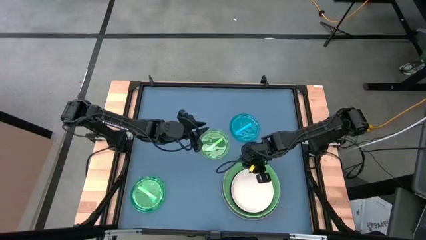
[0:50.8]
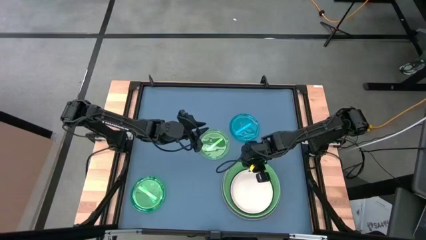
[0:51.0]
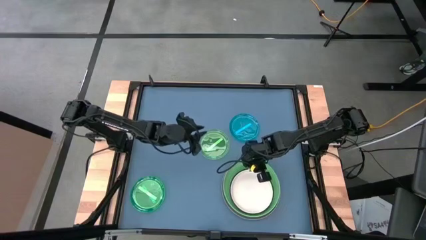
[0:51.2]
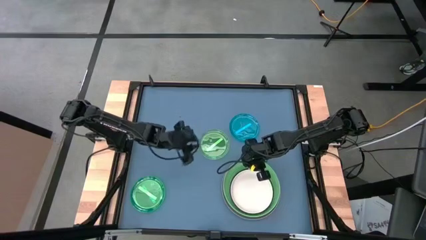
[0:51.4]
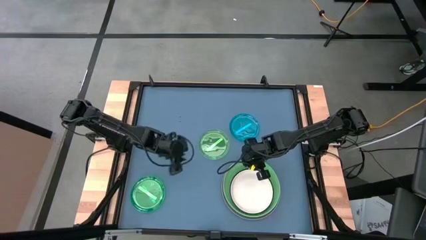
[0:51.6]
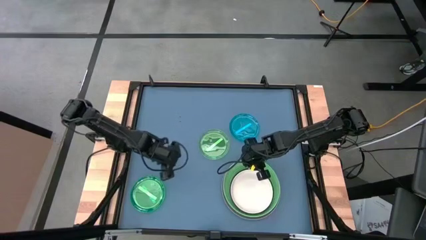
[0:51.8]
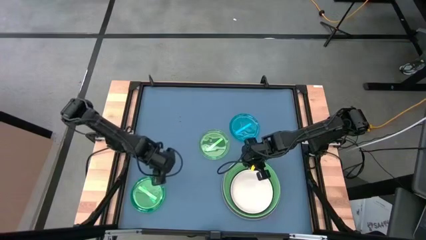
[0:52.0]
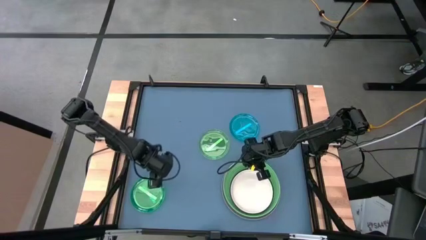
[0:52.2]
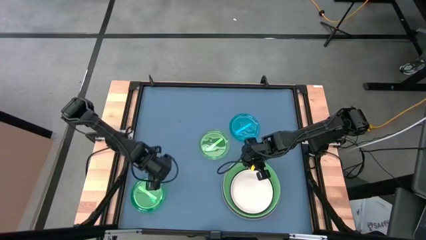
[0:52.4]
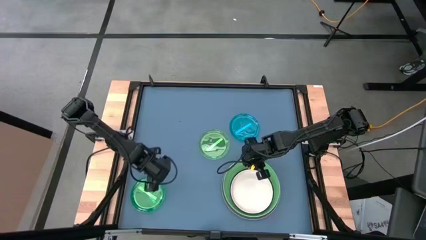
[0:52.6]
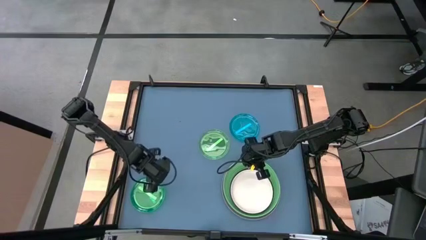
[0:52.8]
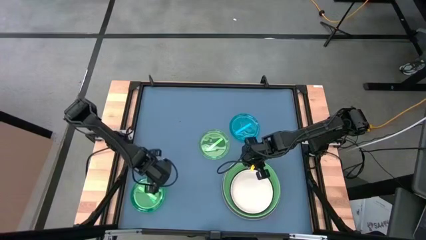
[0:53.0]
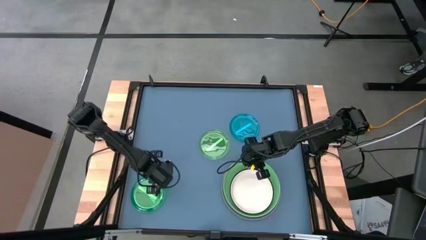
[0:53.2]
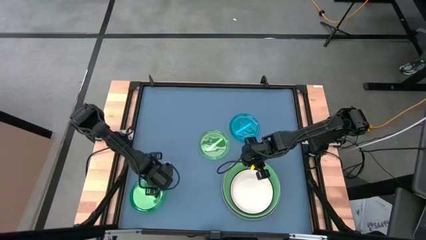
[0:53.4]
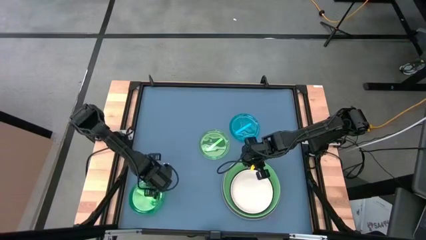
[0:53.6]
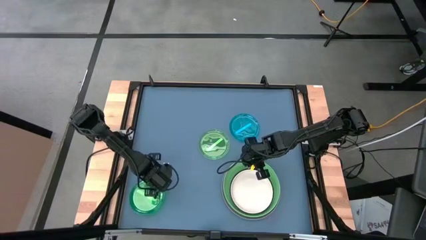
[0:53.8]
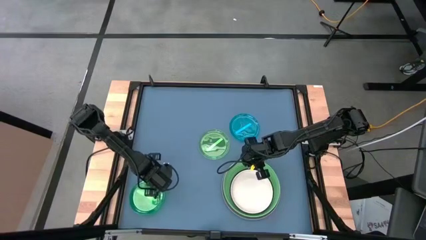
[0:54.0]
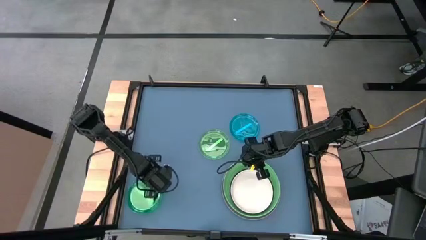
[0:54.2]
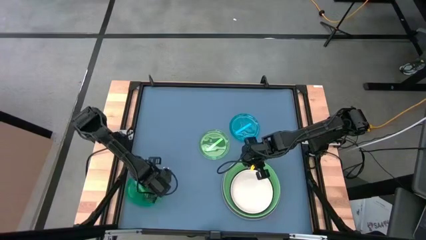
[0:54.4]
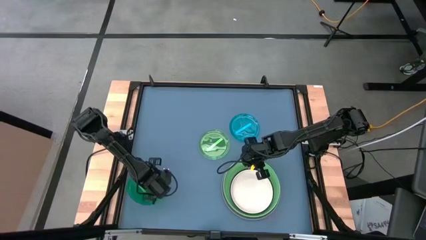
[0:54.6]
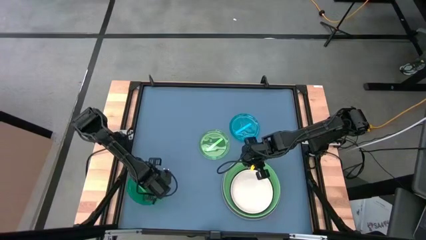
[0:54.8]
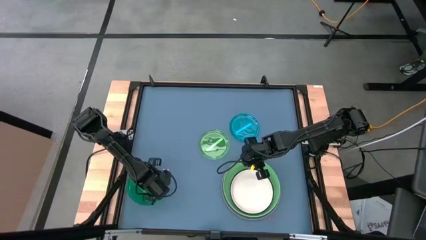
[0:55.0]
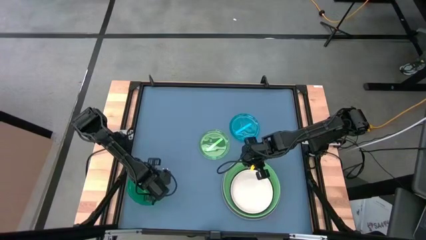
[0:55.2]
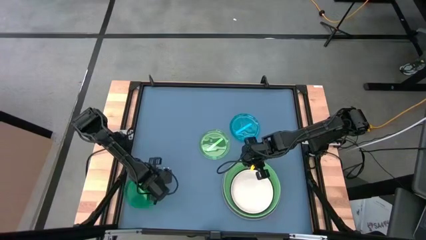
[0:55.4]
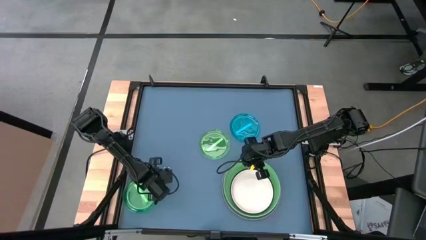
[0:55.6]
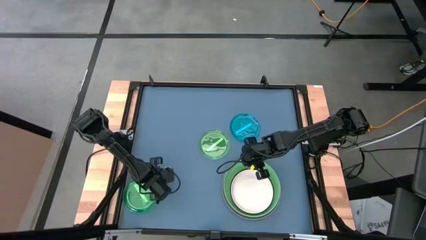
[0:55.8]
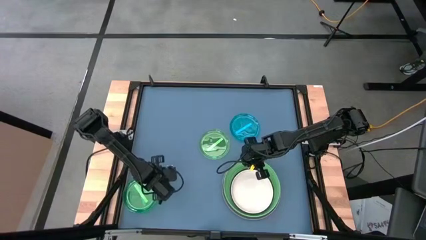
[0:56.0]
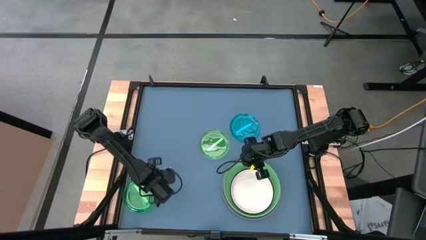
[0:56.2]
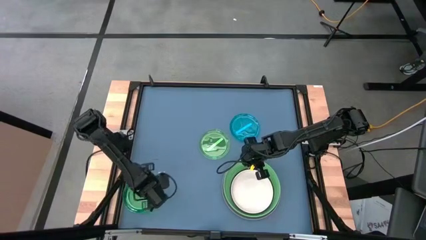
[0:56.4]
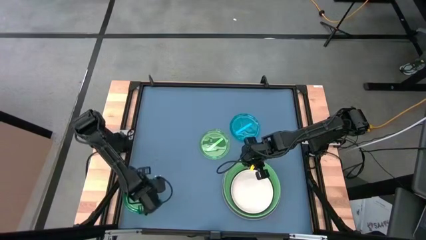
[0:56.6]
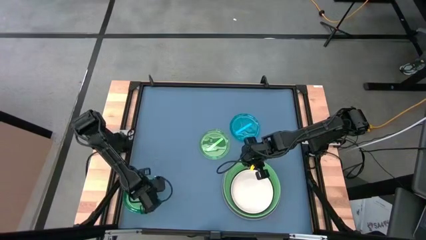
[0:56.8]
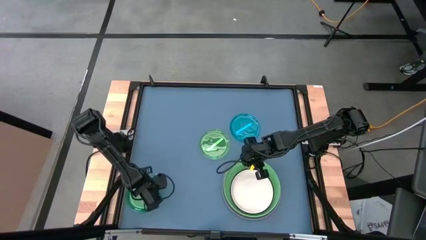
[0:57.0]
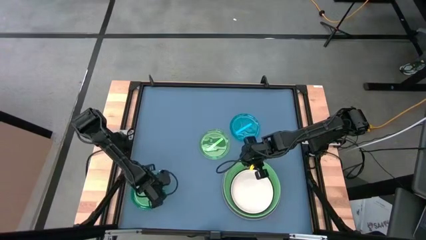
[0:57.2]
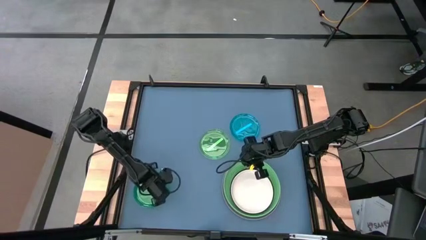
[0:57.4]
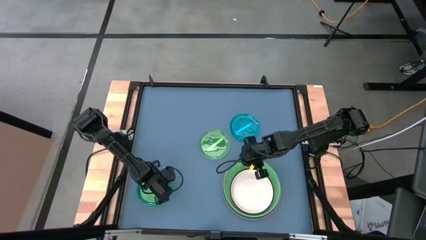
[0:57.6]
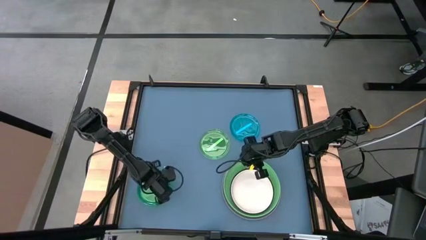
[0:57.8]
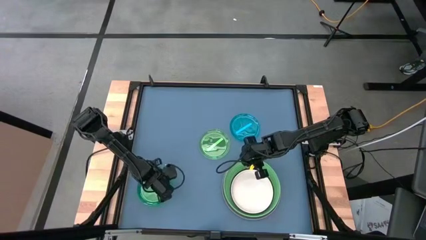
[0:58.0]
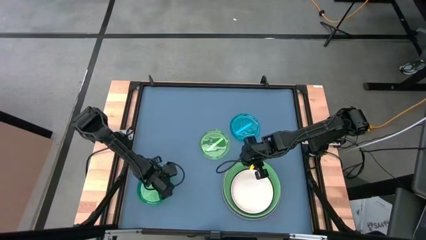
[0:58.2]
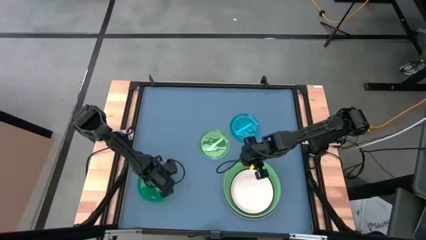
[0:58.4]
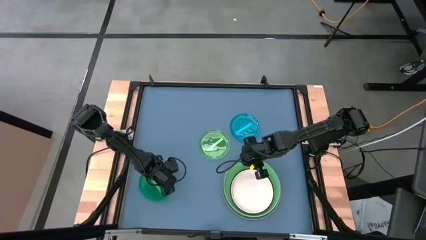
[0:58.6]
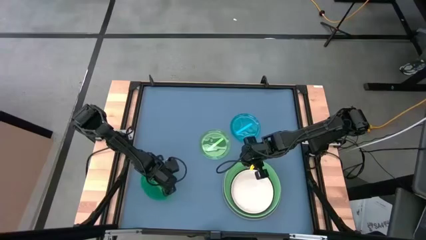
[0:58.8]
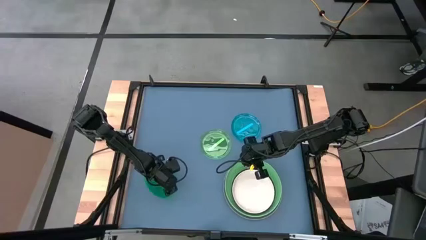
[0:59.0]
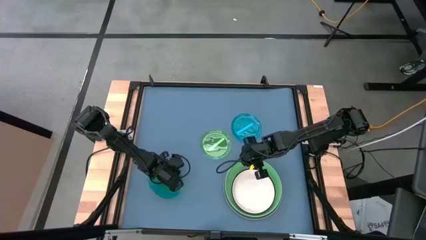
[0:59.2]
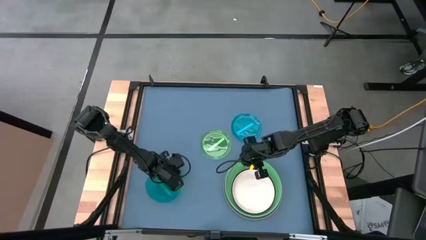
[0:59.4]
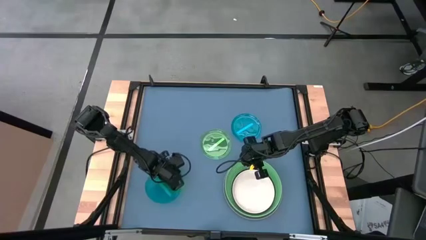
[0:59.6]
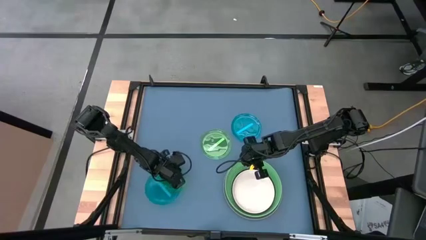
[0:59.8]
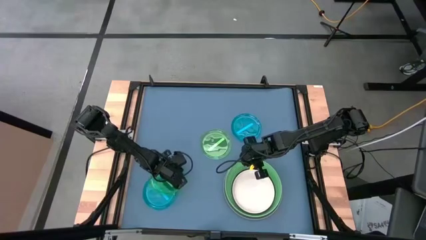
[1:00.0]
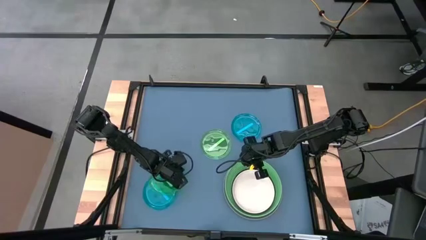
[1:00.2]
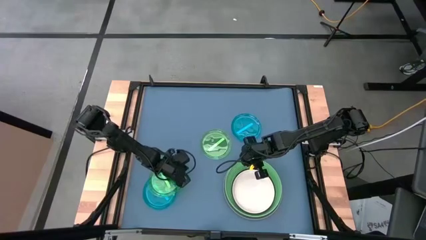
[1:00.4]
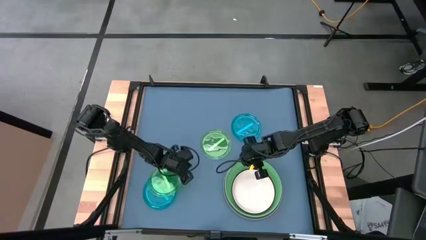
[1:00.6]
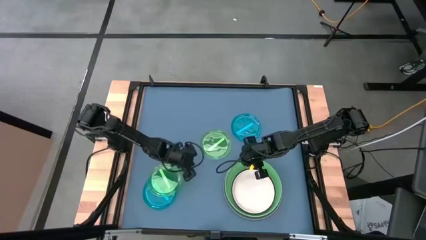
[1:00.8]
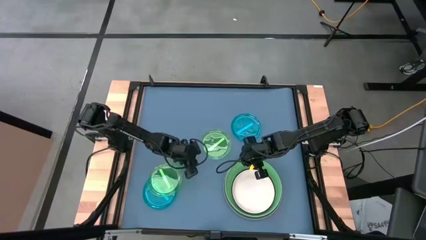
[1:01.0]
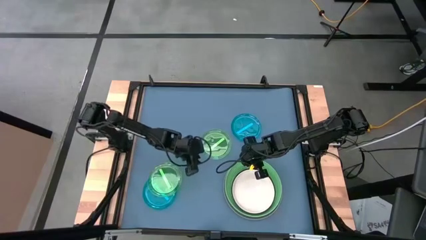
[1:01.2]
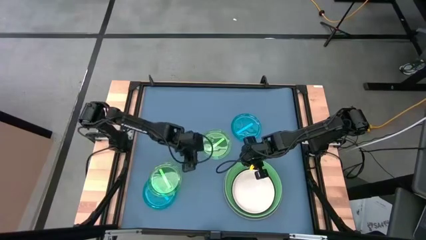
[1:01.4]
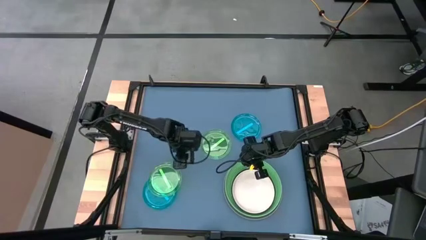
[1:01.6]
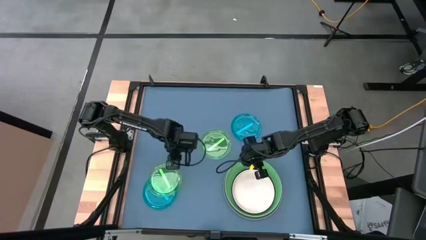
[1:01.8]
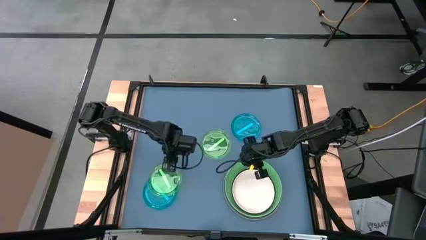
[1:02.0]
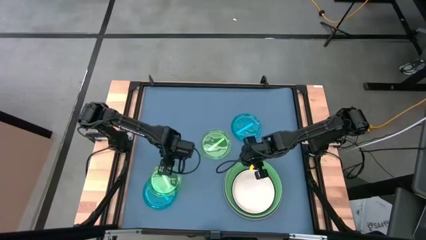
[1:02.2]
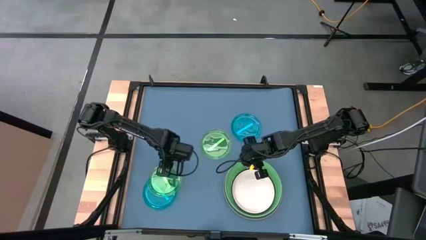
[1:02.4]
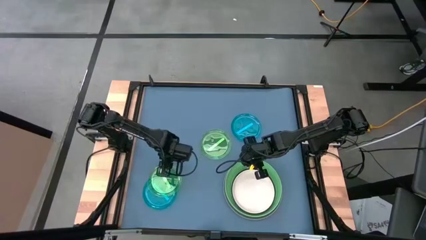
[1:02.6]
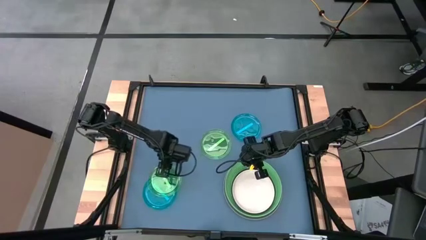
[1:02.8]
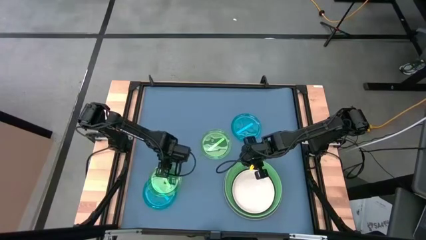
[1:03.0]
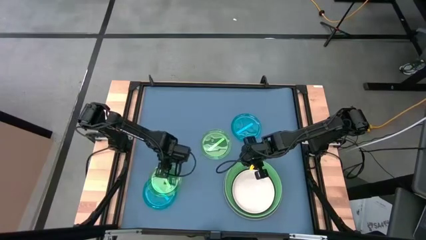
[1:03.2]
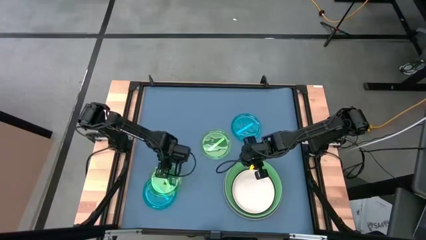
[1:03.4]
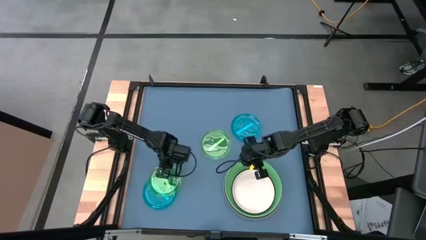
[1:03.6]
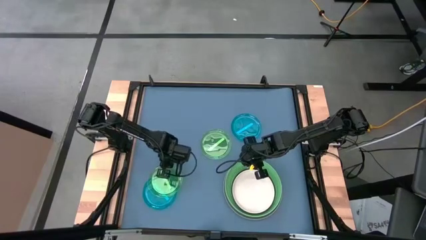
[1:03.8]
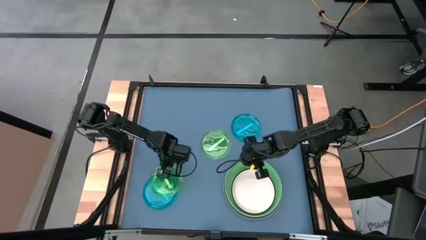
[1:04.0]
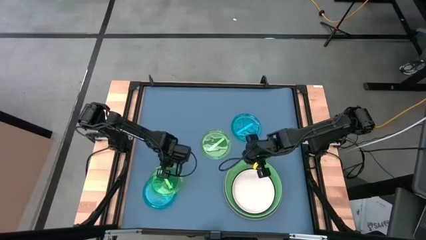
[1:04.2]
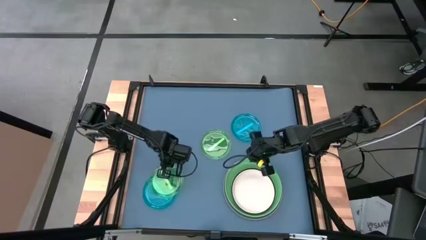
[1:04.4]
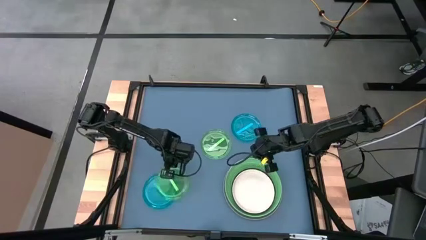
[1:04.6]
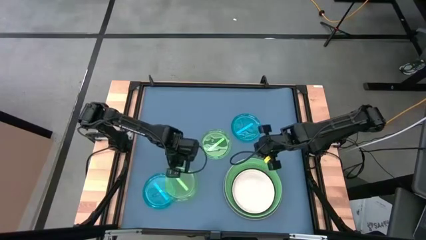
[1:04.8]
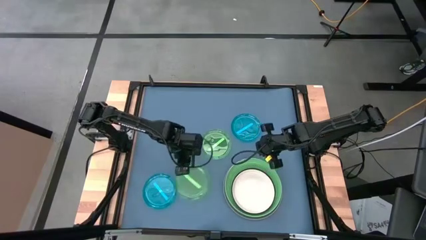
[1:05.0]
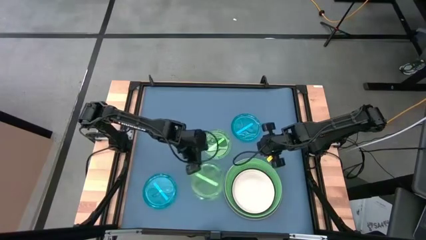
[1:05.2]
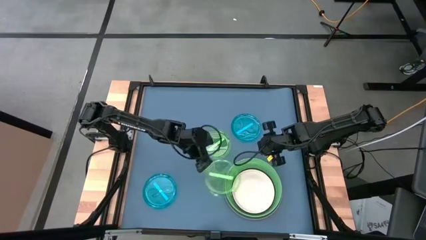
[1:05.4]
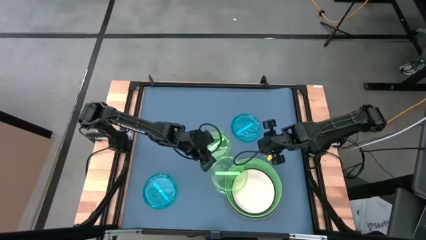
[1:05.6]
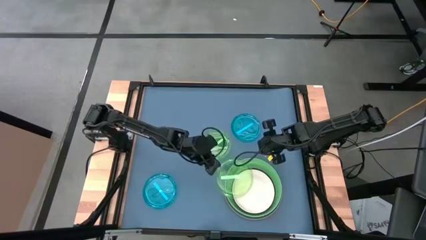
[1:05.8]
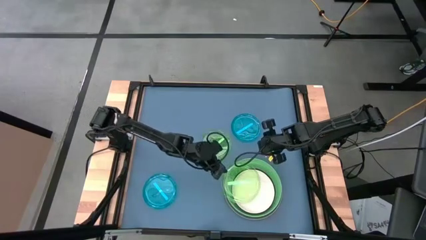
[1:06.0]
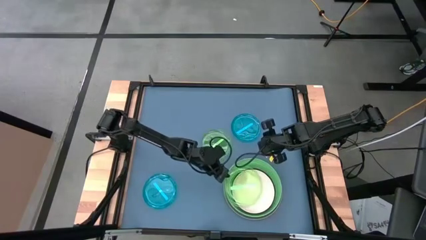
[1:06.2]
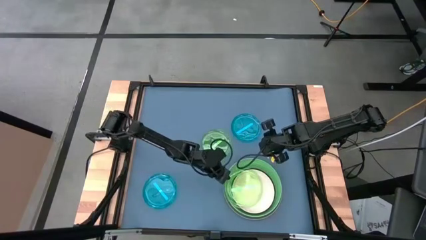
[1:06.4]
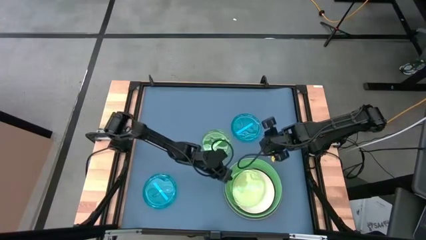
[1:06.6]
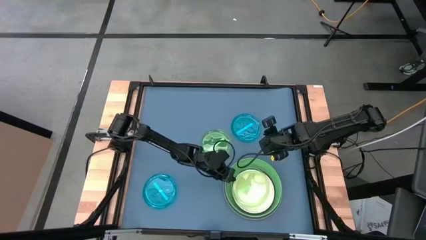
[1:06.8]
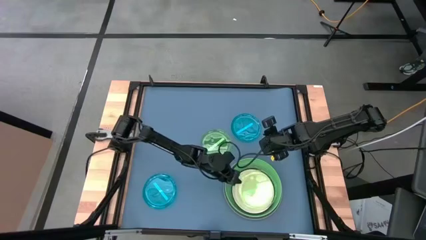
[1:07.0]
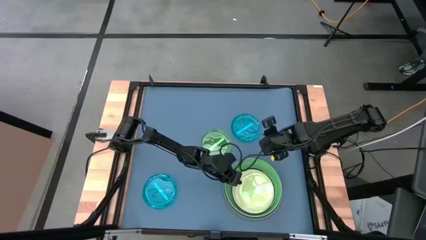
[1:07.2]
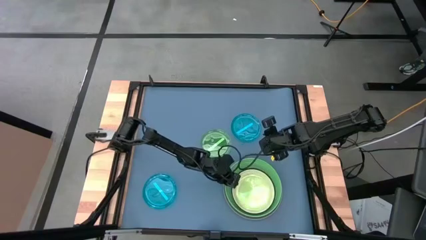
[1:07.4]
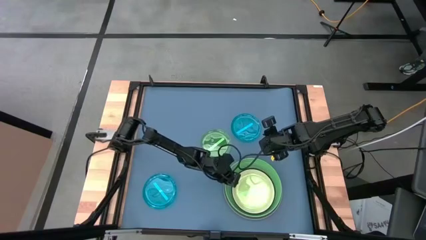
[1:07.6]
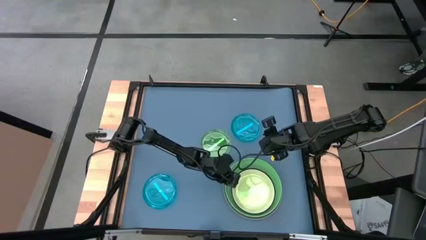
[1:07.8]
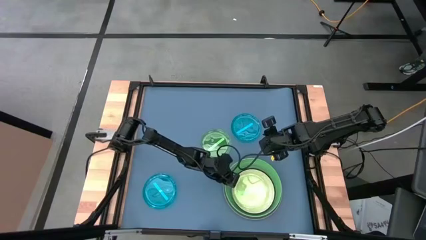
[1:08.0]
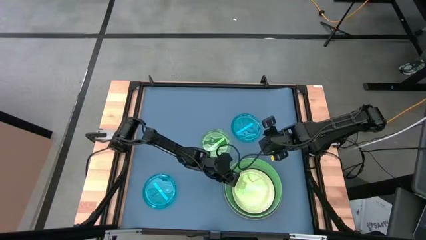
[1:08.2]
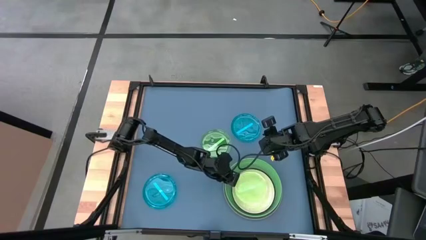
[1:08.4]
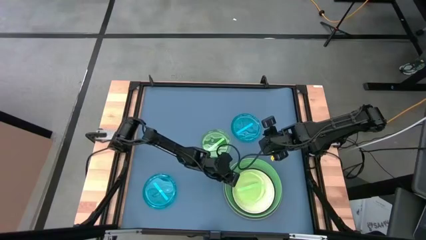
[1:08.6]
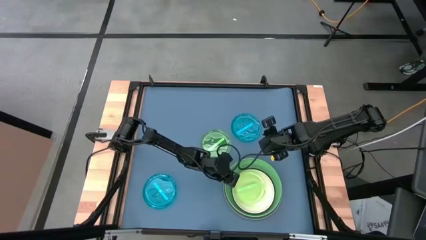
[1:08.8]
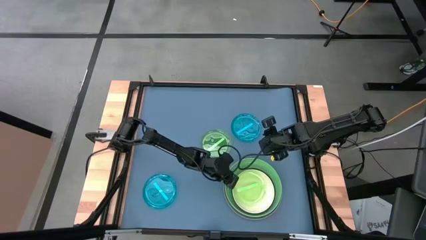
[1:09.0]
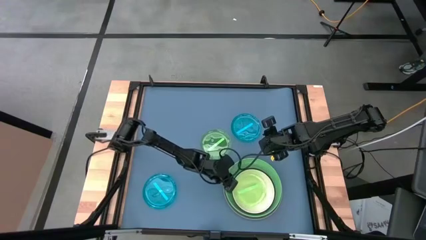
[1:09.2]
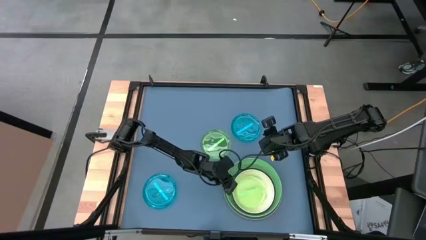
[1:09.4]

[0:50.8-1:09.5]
Task: Stack plastic plates
Stack the bottom small green plate on top of the white plate
